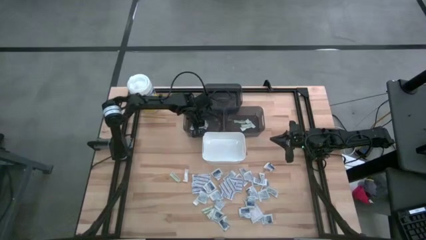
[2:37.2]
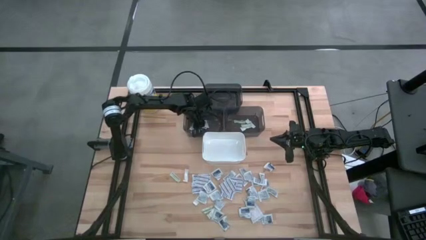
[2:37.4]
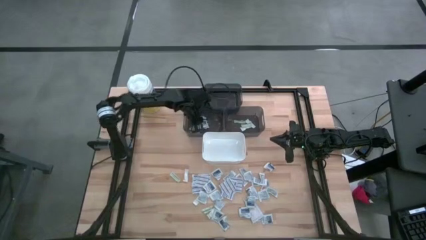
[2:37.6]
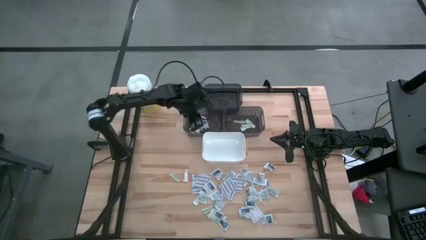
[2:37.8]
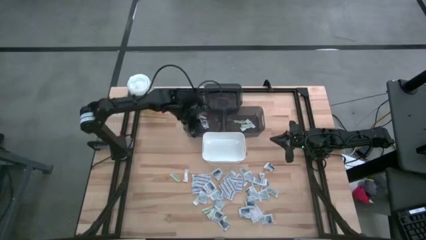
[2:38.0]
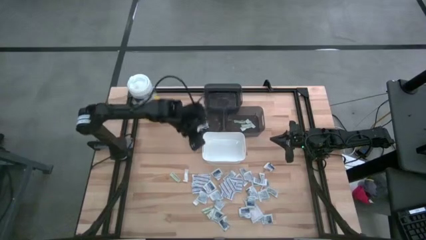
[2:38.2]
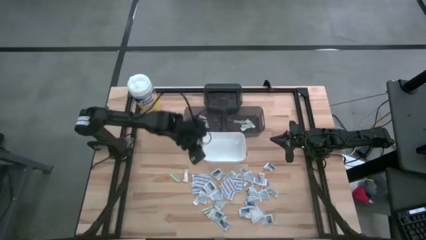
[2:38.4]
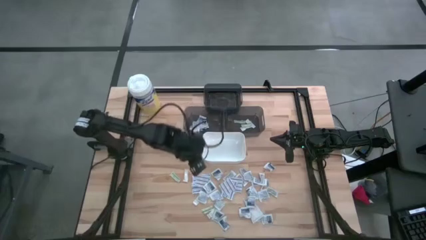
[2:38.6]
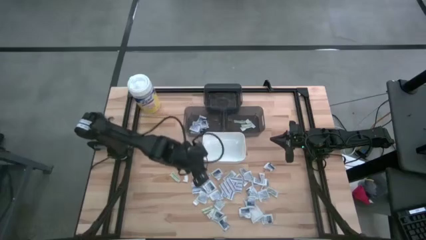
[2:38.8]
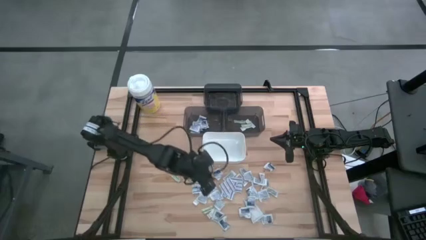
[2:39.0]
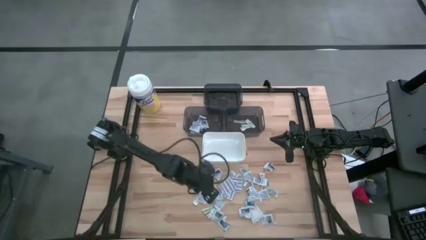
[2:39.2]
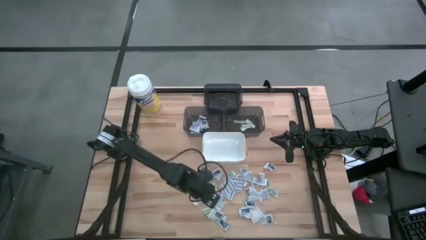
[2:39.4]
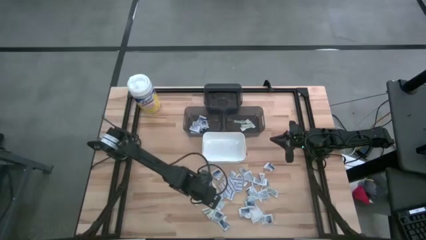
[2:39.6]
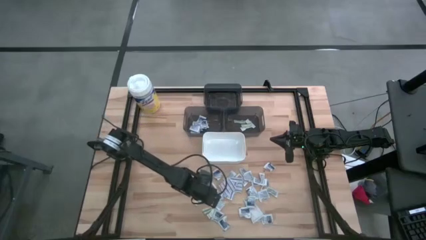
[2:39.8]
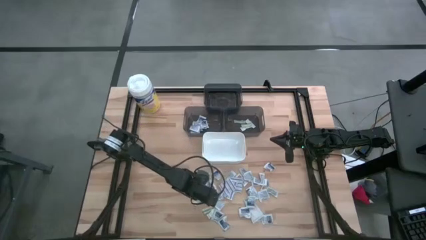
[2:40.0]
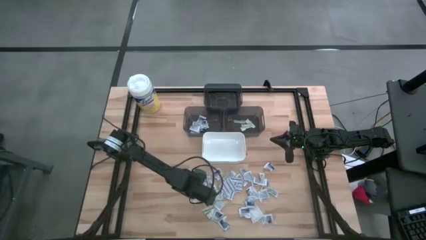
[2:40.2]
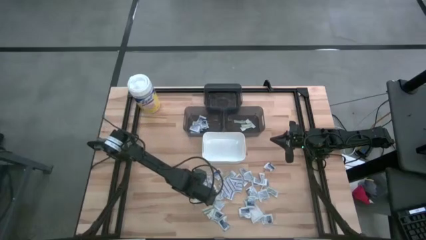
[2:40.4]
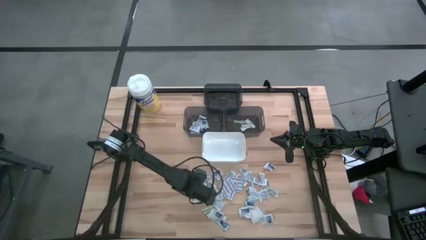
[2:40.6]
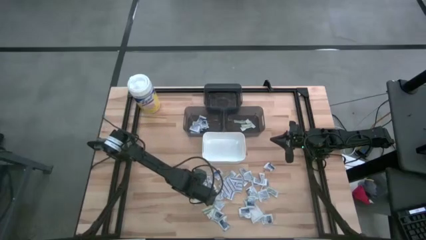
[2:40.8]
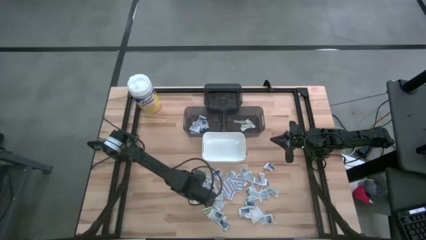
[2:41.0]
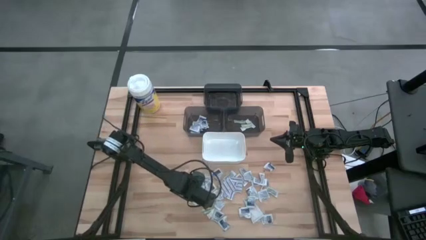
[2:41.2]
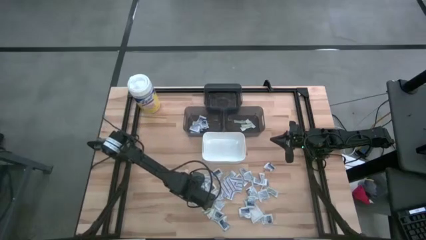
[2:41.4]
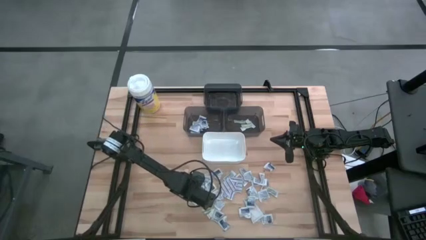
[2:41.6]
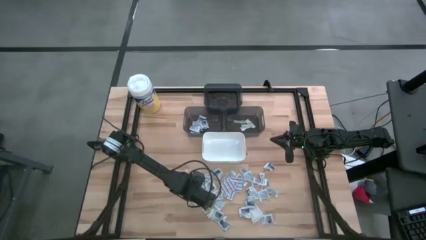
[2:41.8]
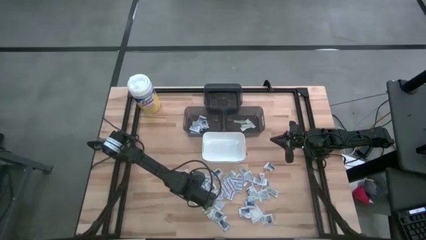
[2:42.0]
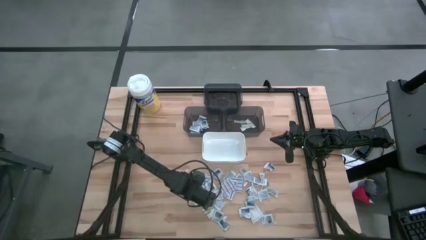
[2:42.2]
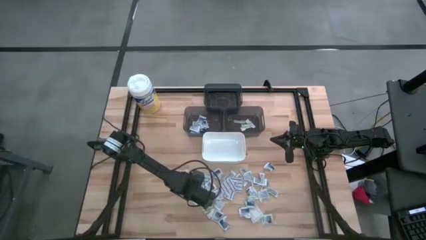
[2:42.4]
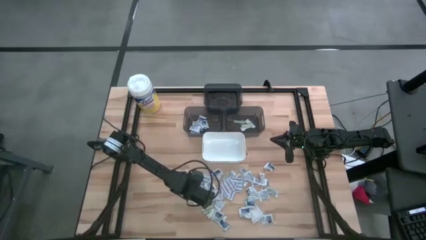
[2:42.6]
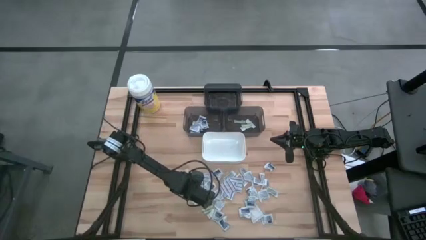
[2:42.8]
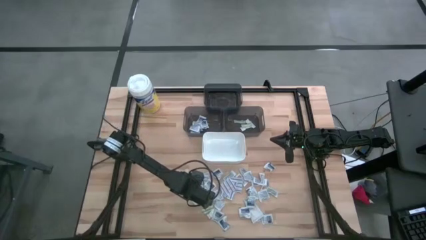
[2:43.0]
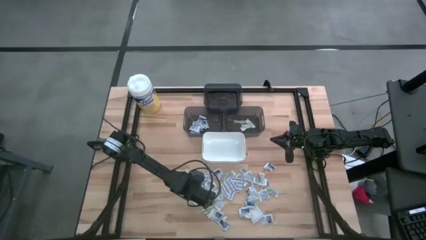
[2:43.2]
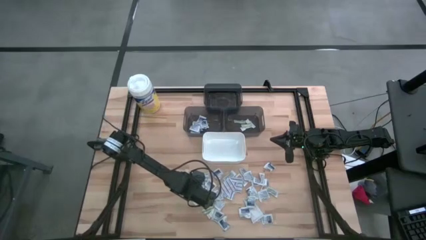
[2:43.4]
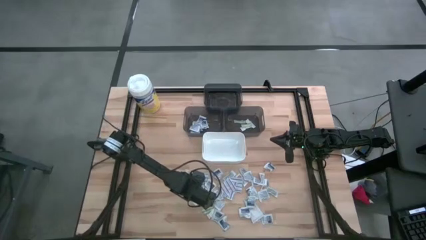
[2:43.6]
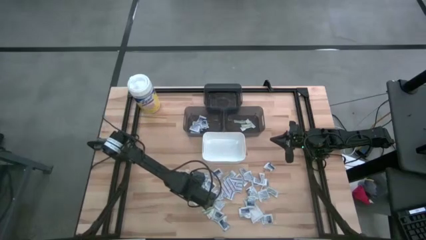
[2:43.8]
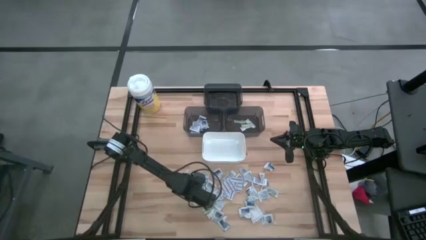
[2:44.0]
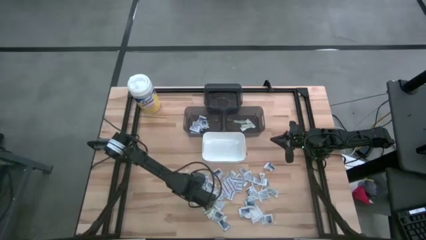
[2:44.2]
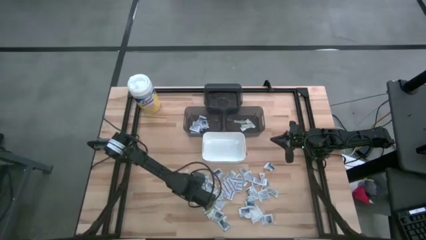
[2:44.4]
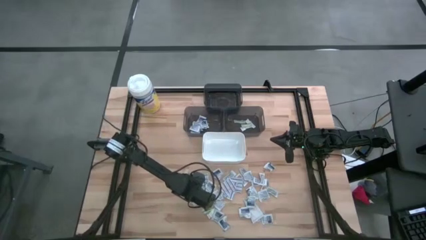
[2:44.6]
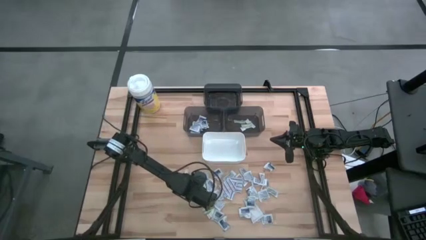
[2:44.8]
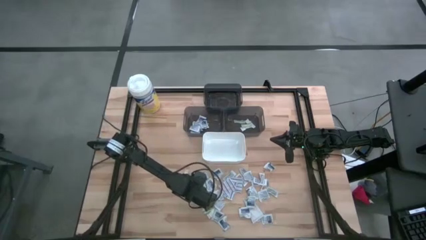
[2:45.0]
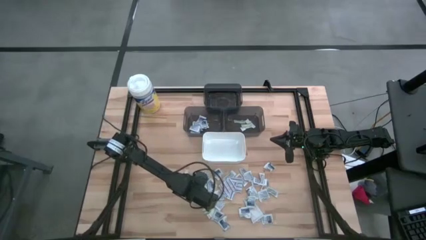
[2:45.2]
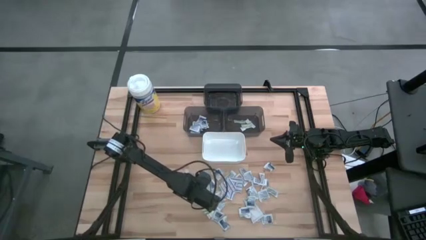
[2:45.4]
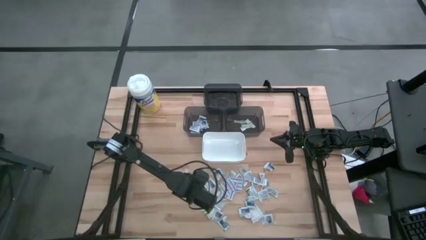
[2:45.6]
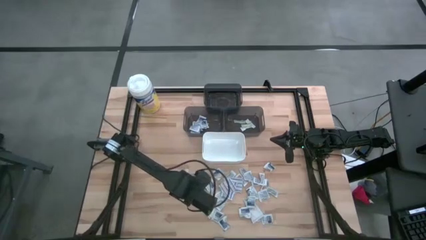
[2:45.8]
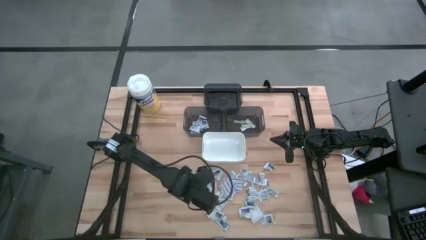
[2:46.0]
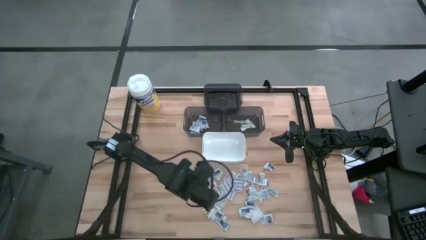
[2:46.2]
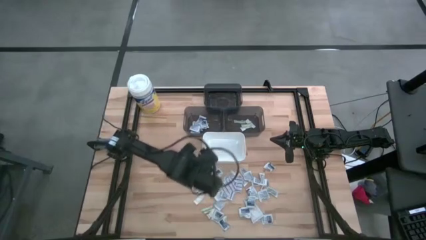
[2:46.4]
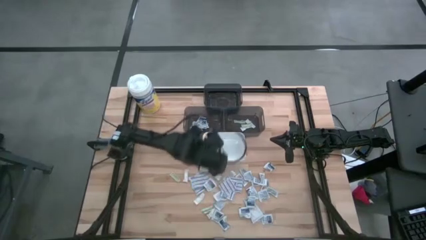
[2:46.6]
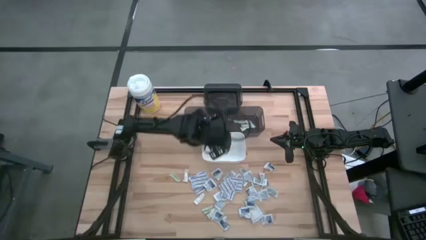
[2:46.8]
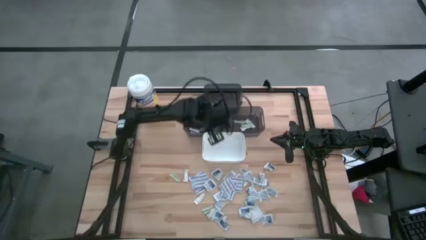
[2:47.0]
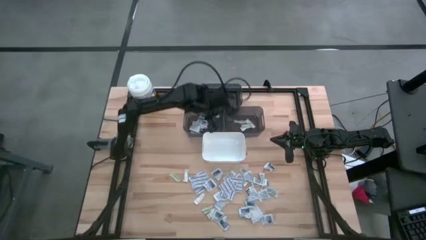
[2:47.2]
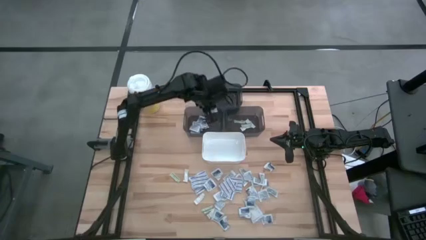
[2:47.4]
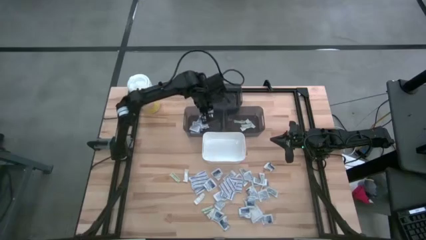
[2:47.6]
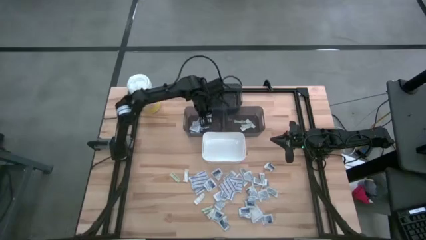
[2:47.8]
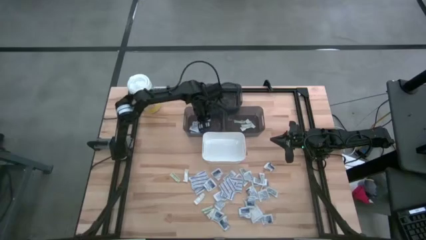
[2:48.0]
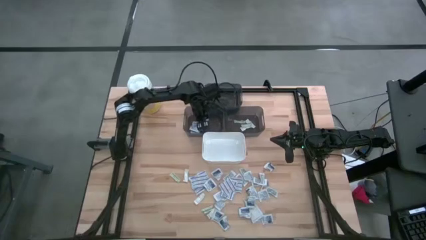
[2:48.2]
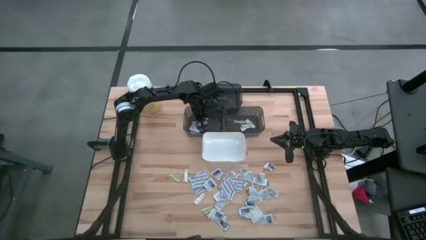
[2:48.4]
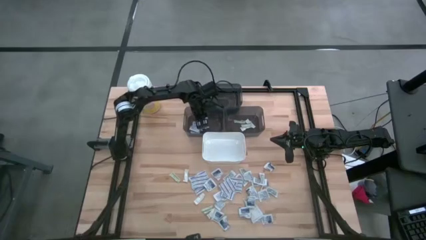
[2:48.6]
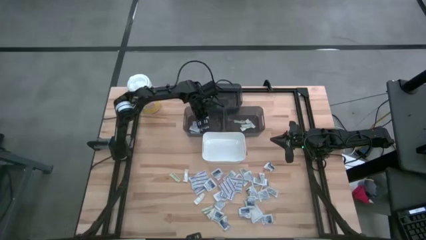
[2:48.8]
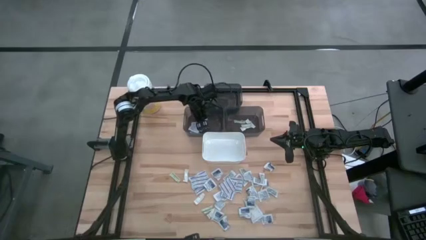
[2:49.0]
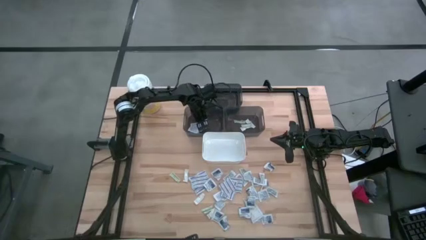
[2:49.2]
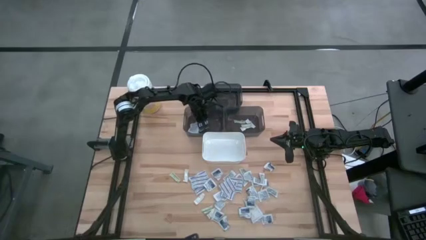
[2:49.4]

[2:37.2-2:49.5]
Task: Pick & Place First Aid Supplies
Put the alcohol pad into the bottom left black bin

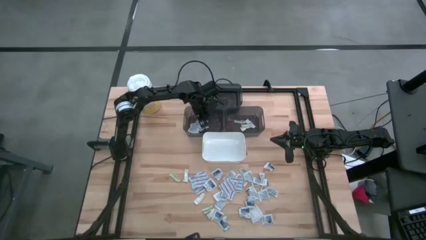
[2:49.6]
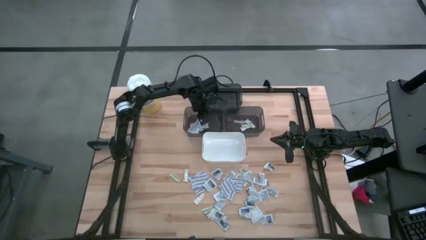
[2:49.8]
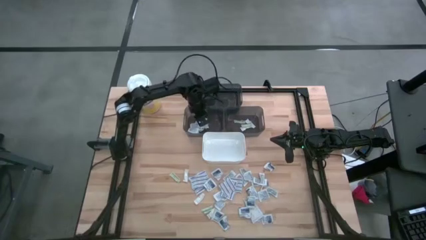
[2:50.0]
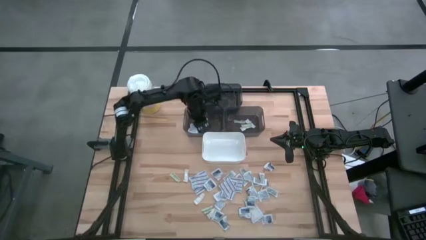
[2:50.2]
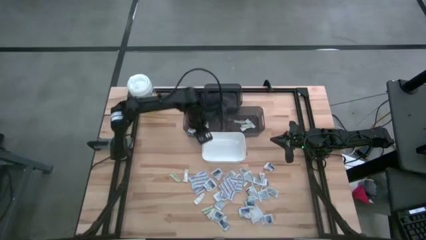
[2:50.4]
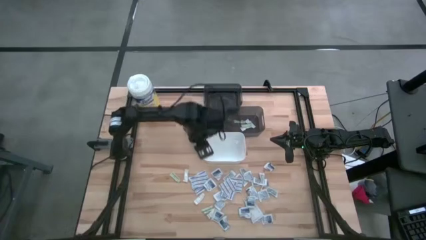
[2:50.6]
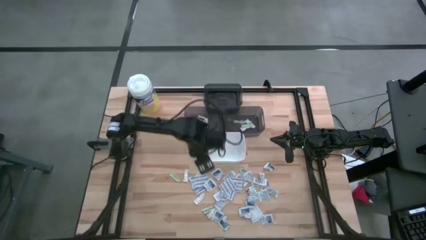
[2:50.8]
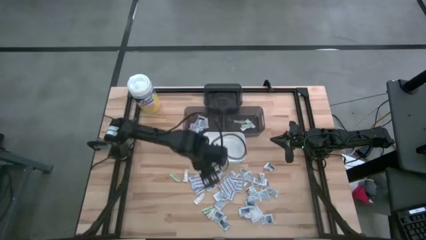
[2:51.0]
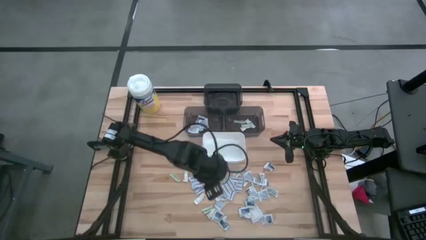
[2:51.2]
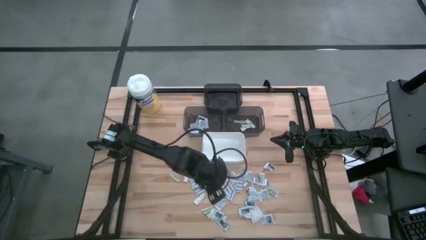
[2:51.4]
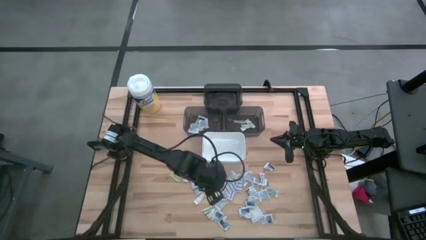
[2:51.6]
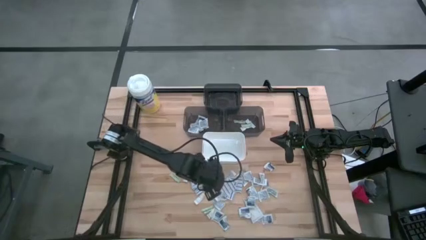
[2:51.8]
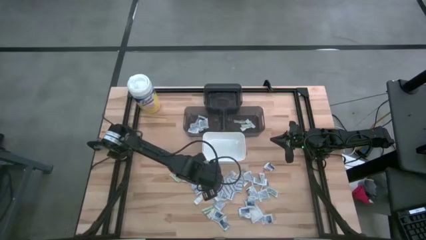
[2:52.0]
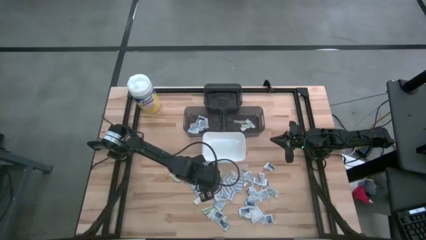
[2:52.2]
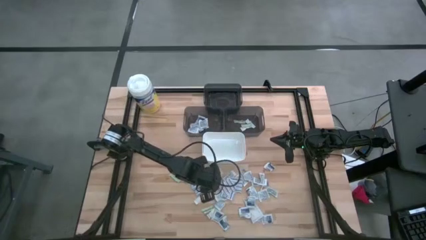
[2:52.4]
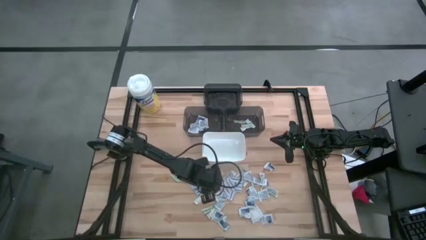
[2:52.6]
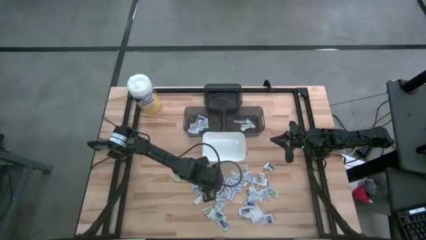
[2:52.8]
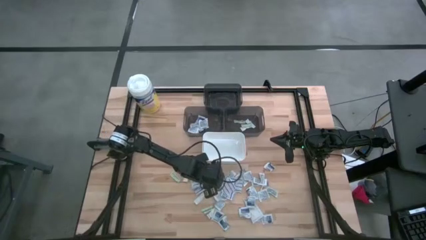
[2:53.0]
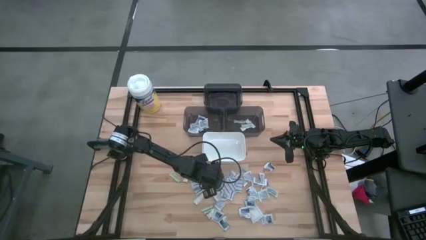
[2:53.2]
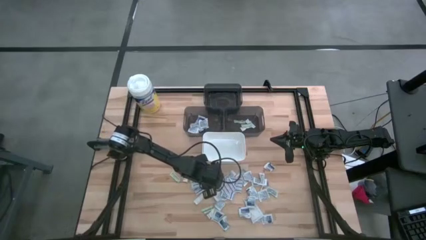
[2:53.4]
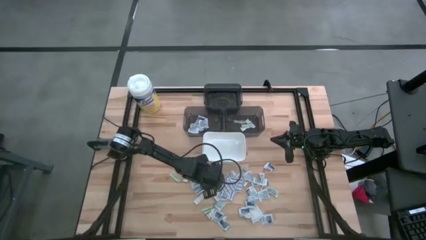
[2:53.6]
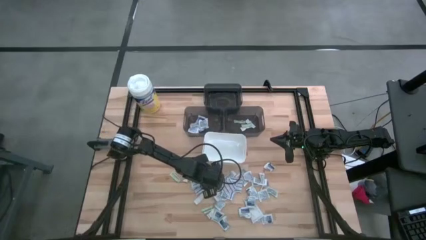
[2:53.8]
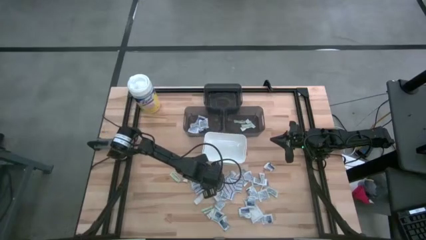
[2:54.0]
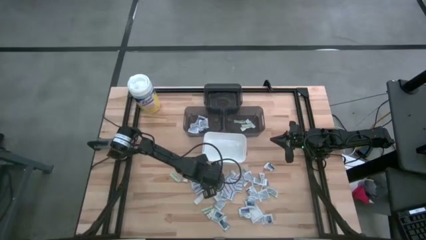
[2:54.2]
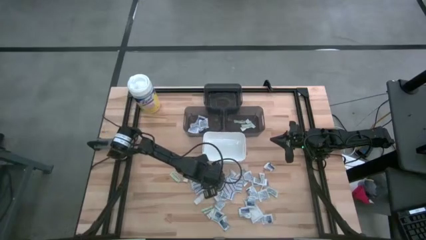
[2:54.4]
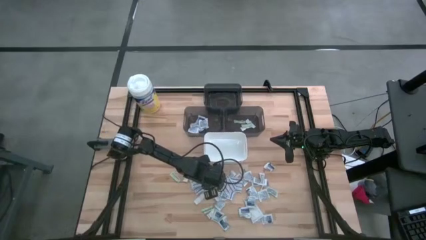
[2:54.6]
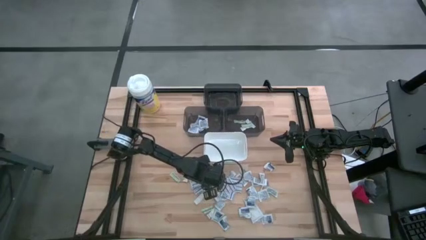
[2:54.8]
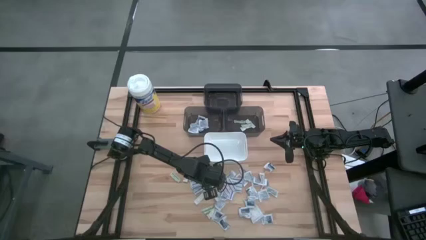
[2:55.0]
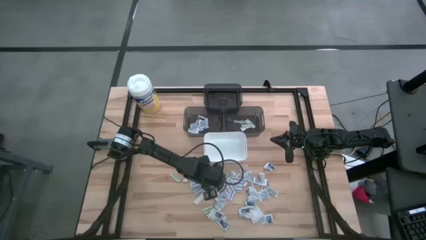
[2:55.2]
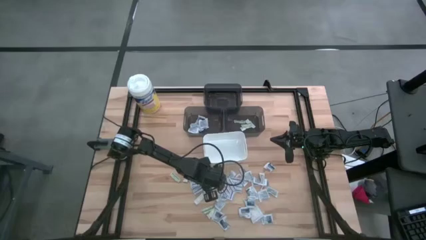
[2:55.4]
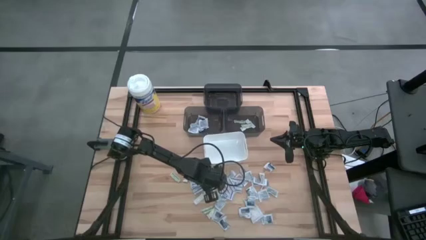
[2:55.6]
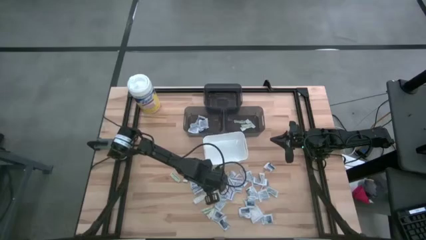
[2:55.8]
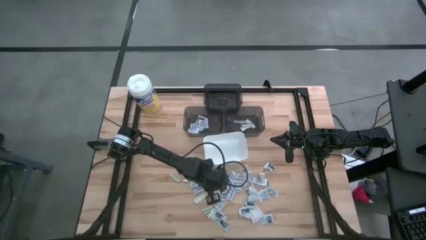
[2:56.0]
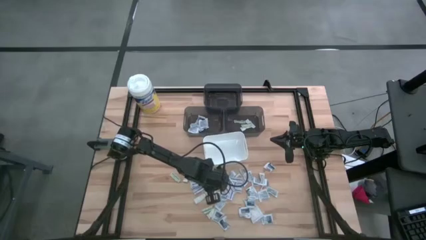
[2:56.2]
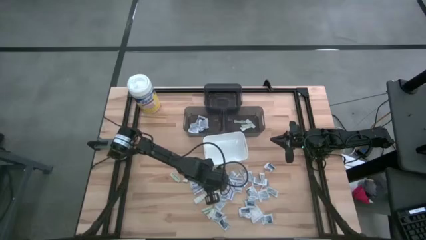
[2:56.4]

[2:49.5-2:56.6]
Put the alcohol pad into the bottom left black bin
